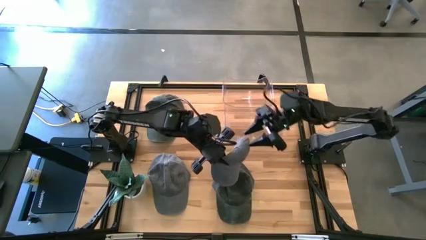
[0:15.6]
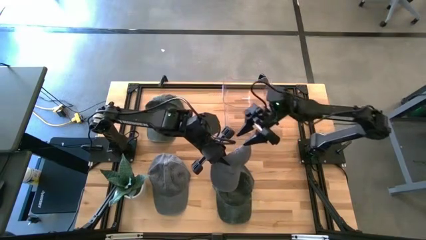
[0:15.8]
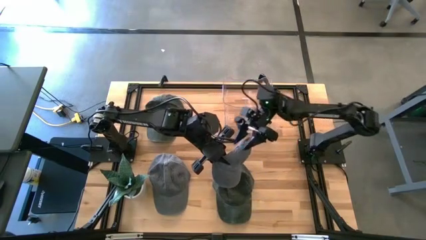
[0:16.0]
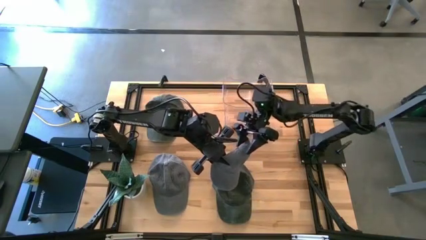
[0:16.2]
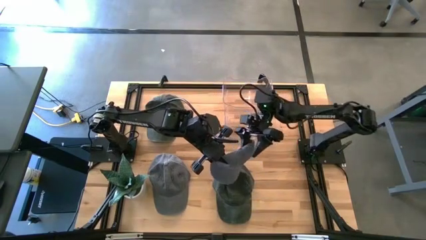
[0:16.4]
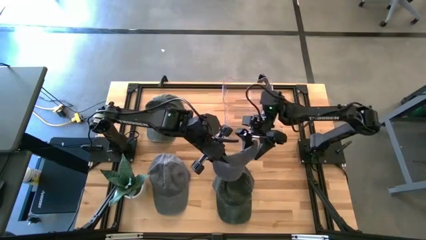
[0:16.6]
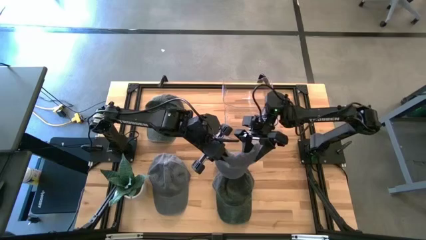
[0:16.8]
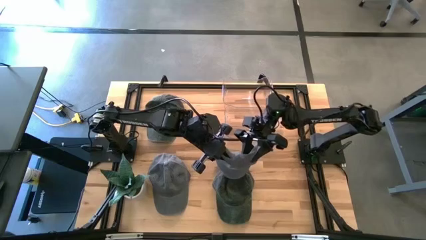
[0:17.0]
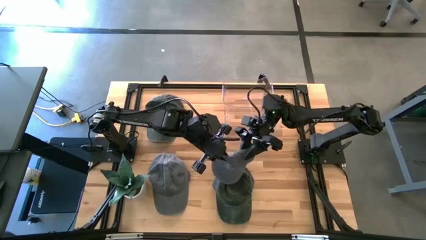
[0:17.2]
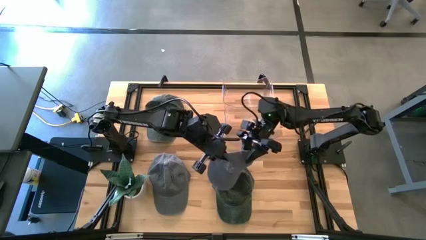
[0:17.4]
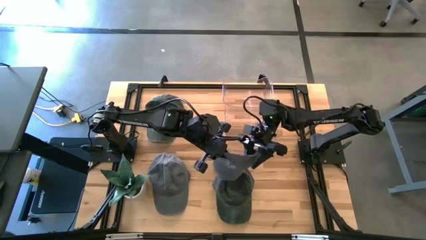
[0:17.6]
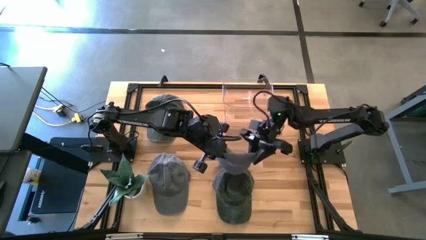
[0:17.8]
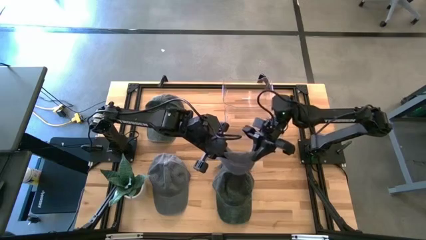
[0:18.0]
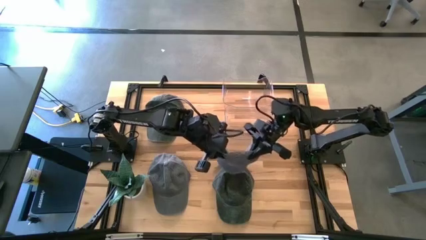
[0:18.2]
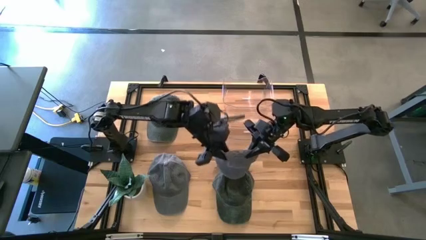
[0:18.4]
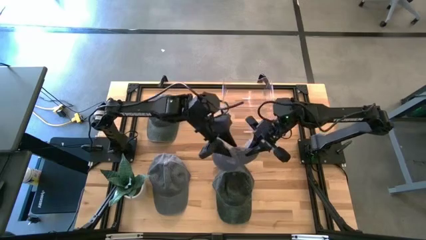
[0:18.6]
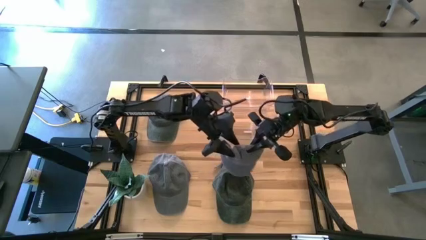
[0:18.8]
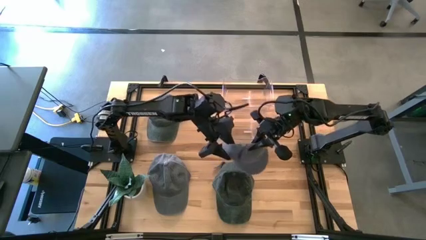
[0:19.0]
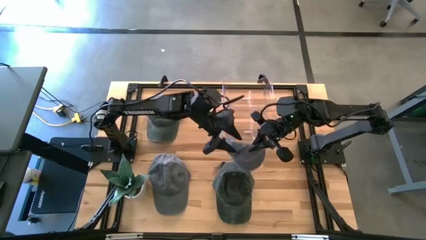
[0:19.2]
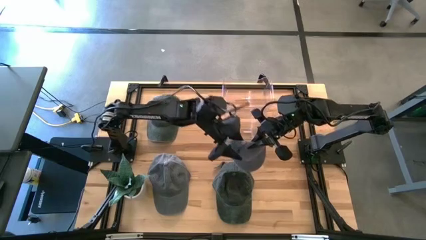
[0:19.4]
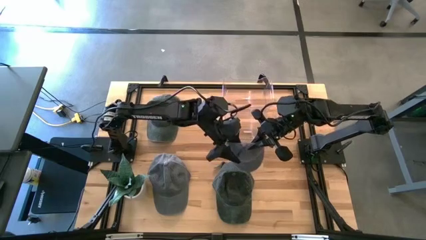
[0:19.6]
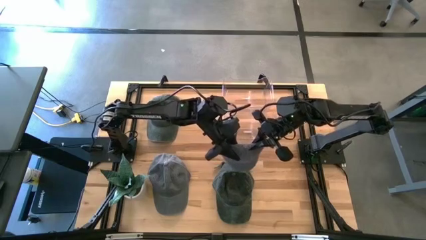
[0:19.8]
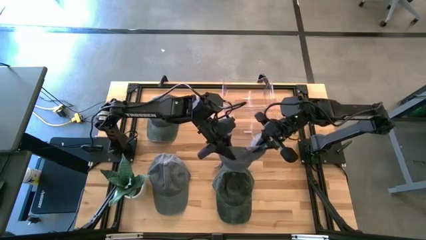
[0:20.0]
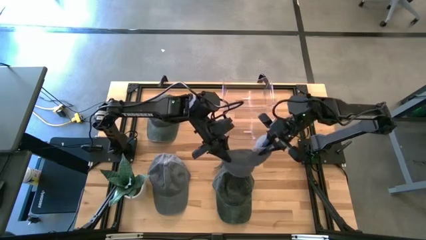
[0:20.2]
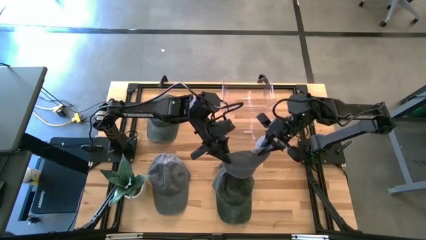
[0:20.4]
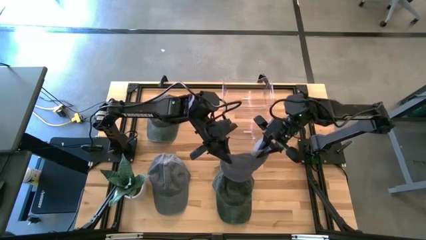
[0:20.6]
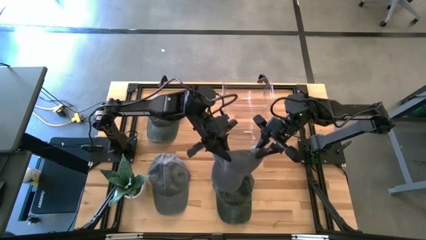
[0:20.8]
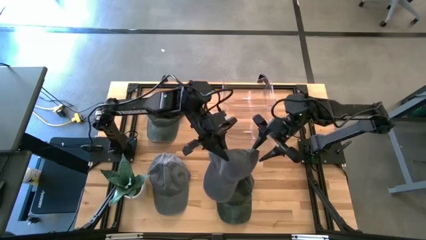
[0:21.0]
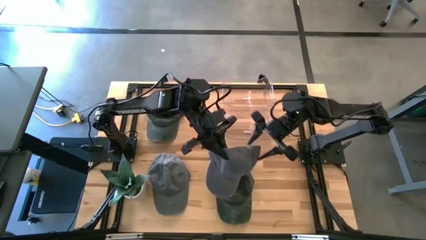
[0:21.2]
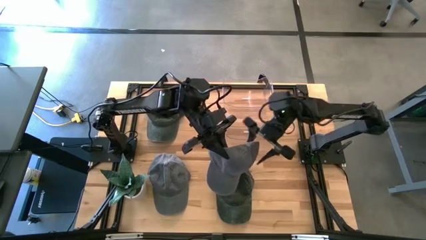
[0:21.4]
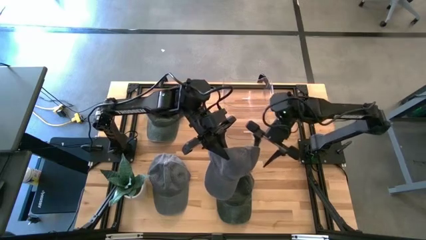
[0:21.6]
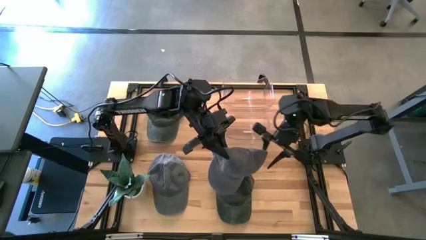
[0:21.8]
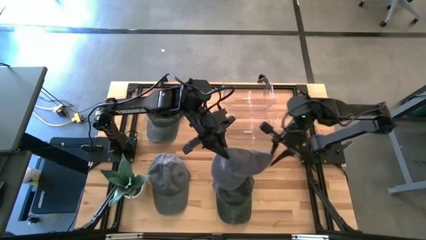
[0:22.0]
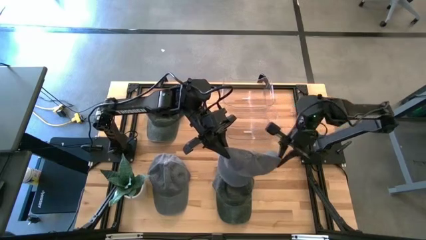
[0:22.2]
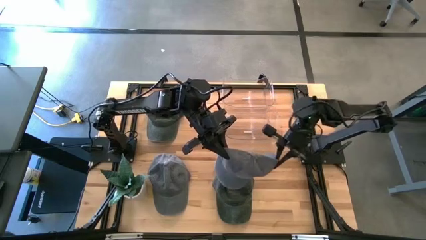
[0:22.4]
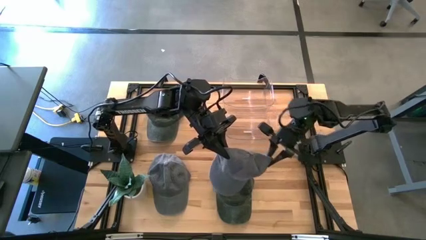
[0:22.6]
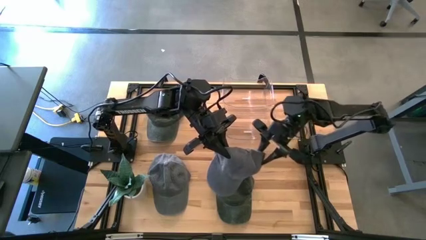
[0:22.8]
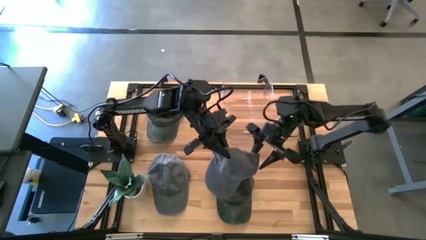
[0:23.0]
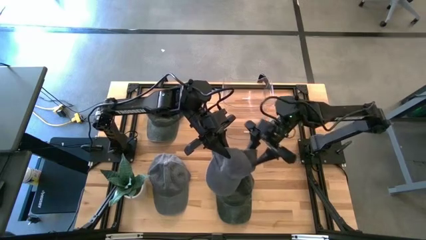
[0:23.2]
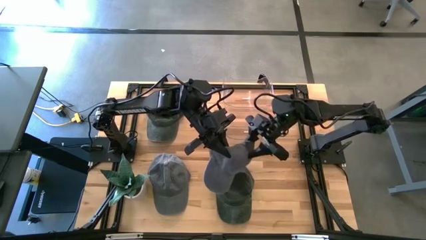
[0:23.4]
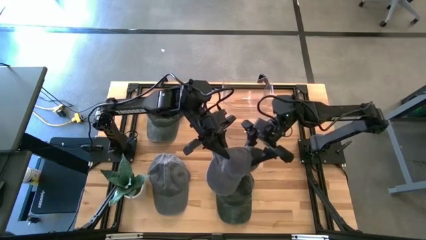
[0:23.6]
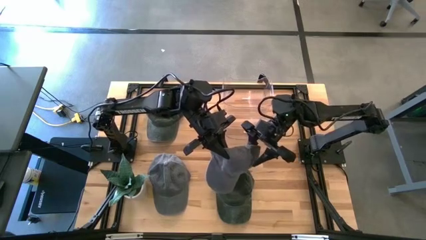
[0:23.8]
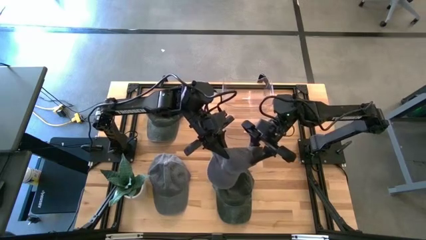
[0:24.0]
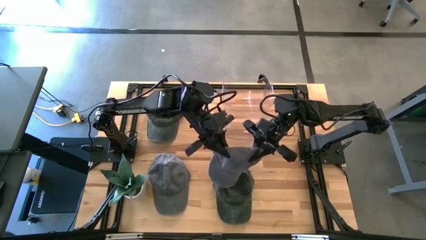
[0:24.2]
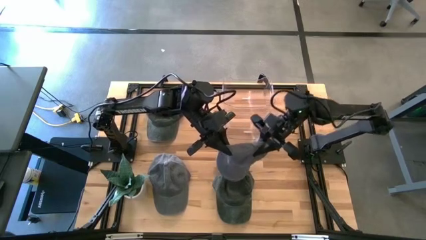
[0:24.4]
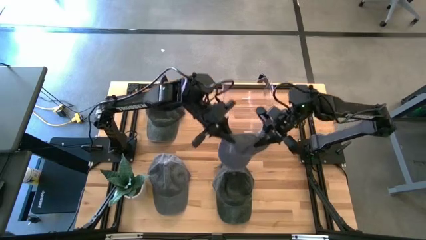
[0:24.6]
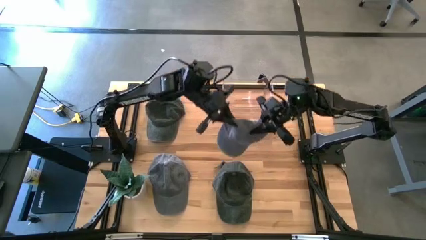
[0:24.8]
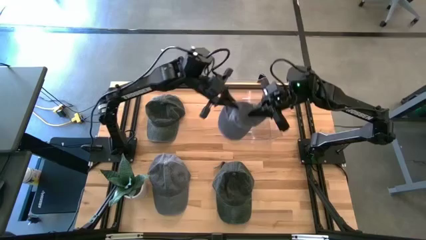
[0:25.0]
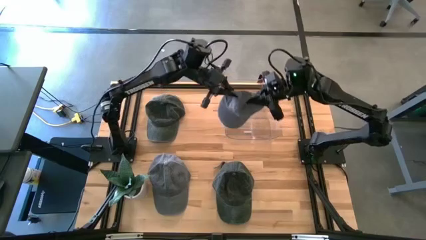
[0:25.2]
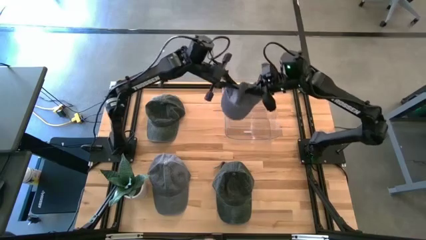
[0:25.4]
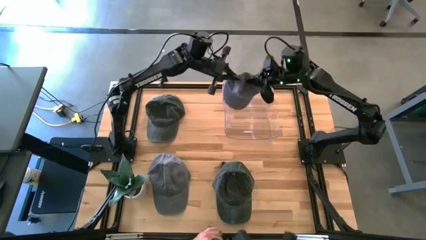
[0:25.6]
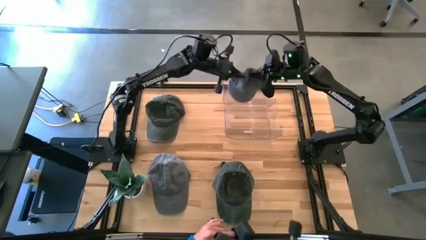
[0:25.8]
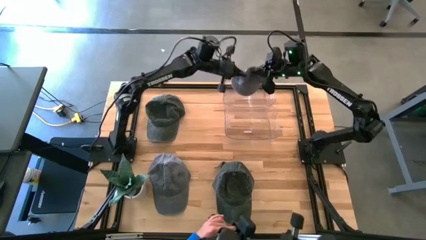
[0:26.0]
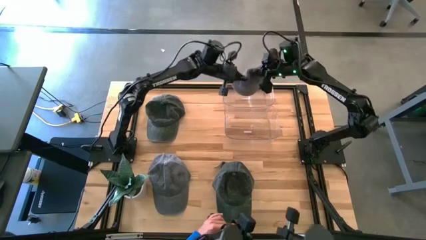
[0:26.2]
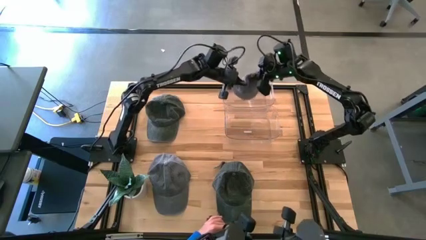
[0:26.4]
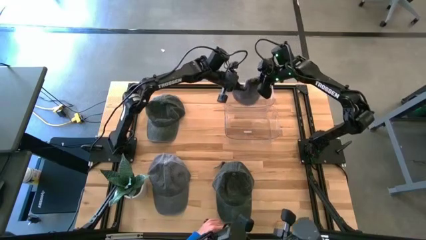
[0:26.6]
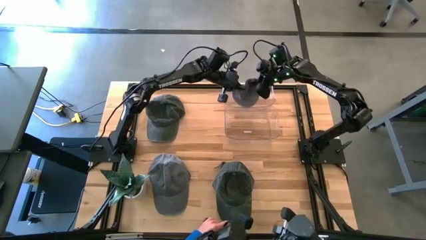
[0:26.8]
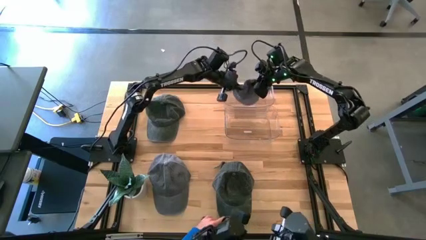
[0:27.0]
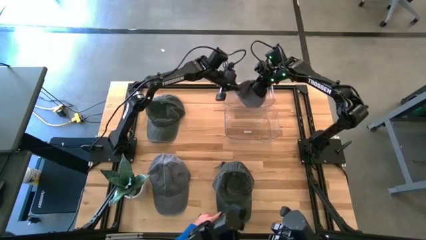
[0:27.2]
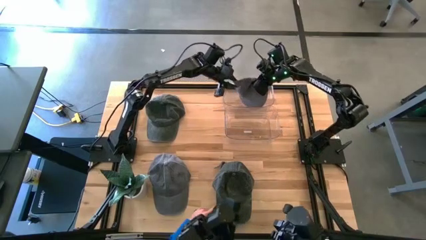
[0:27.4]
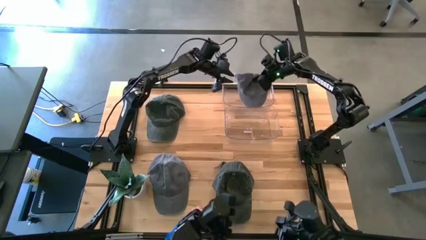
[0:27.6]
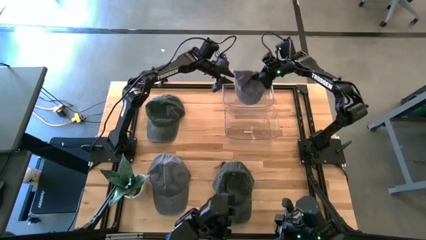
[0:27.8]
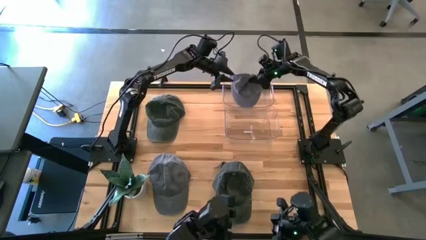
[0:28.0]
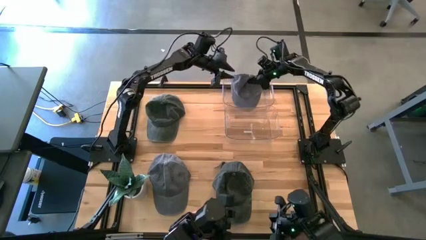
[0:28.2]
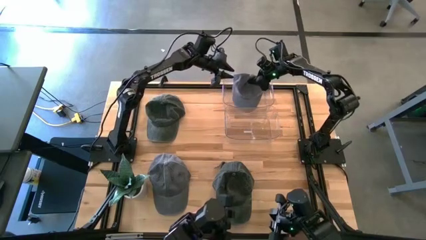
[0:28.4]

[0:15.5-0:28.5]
Task: Pick & Place hat
Put the right gray cap into the top transparent bin

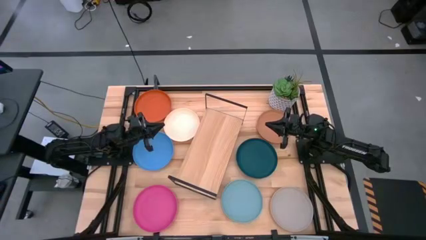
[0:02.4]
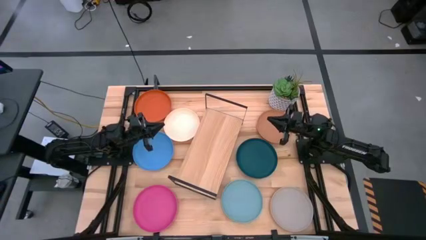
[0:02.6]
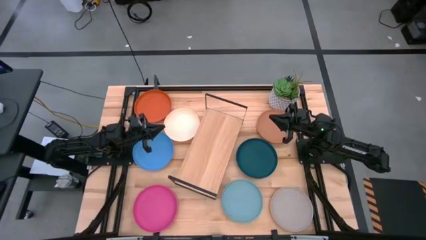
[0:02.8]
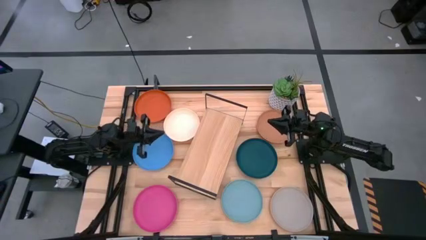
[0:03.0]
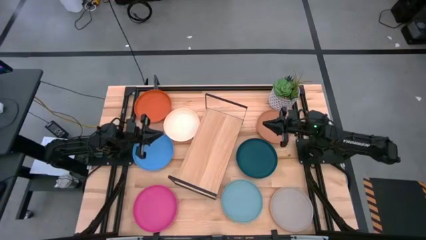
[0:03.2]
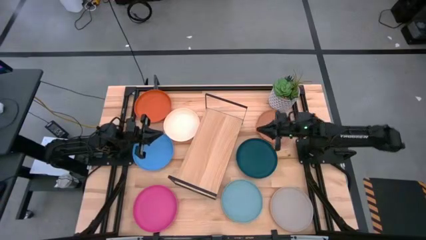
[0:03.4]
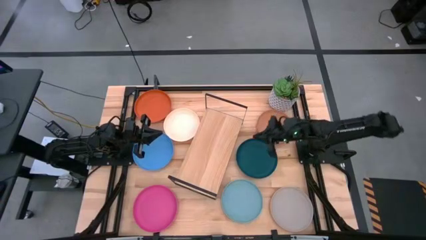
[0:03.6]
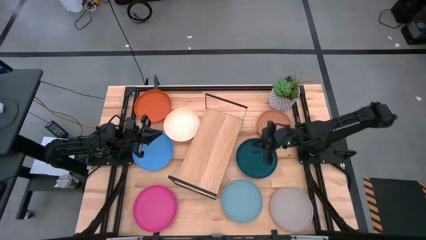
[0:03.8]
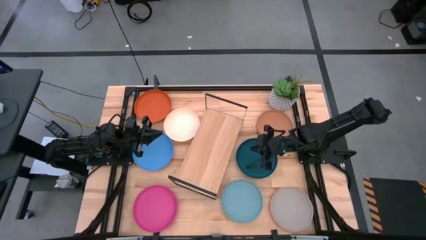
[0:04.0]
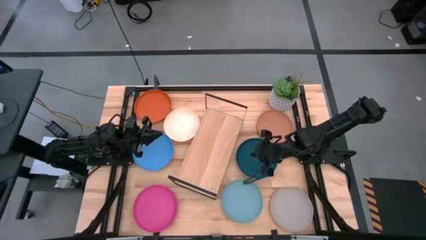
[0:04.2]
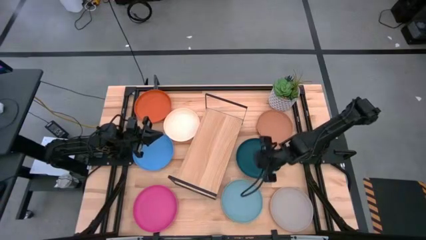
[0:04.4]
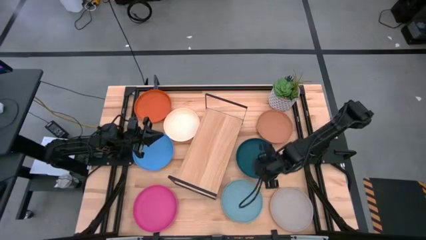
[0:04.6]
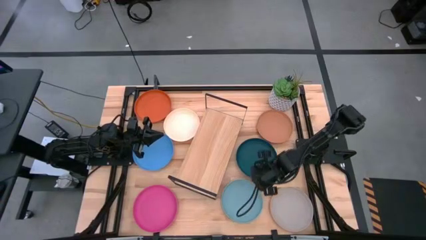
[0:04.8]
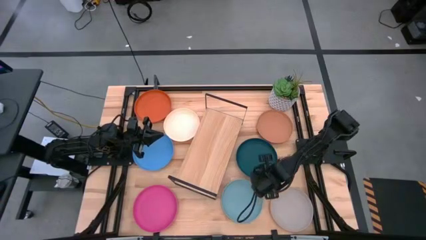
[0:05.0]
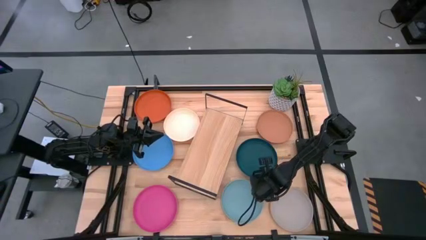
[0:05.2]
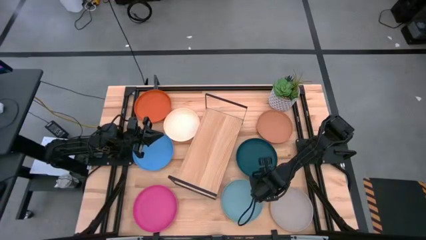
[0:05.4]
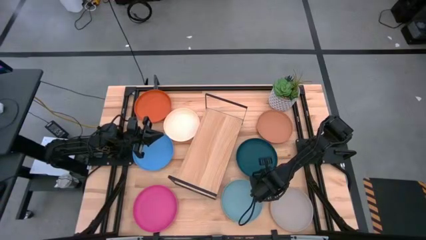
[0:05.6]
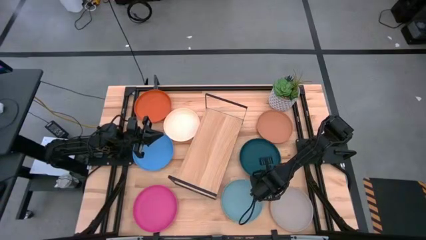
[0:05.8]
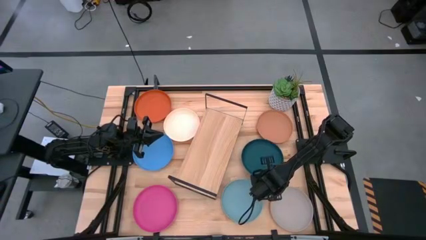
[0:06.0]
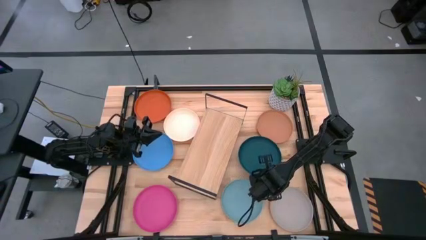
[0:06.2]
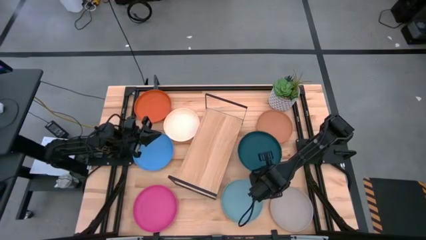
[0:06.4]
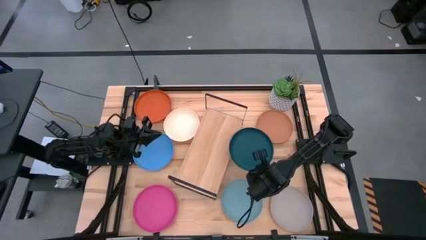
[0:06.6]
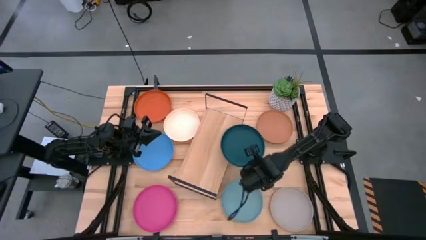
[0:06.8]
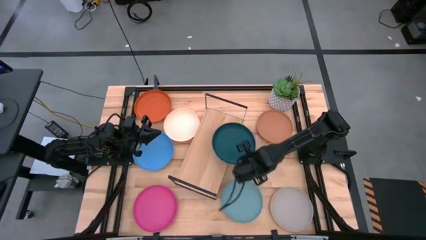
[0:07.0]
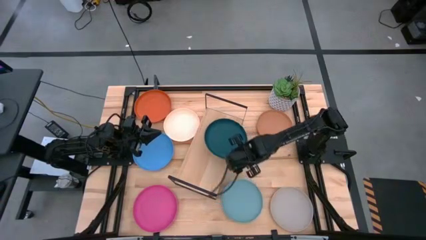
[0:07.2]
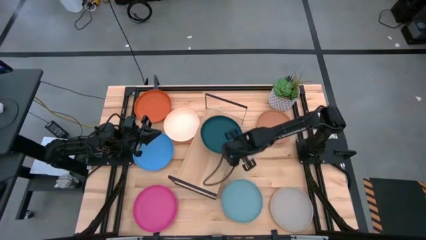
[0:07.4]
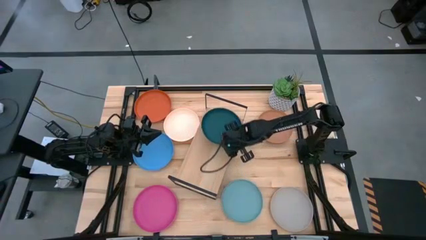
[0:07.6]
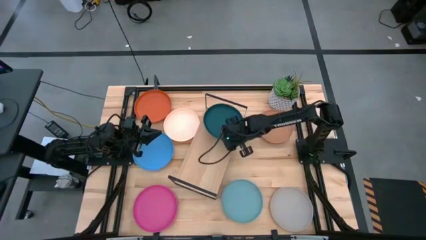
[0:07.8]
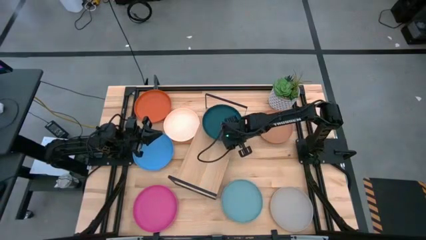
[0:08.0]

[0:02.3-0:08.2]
Task: Place and stack plates onto a shelf
Put the dark green plate on the shelf
